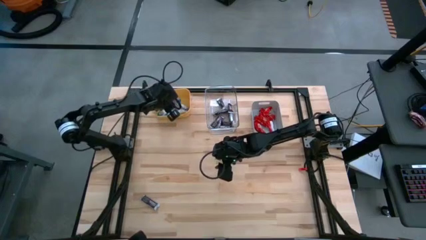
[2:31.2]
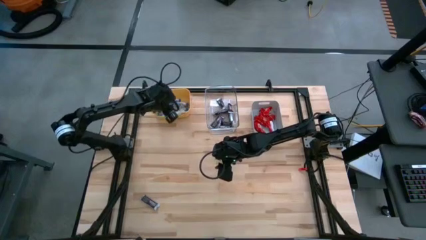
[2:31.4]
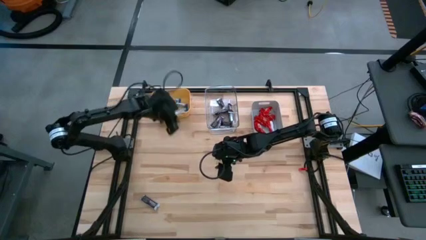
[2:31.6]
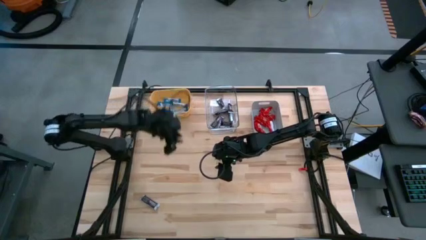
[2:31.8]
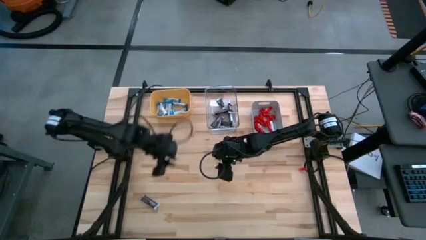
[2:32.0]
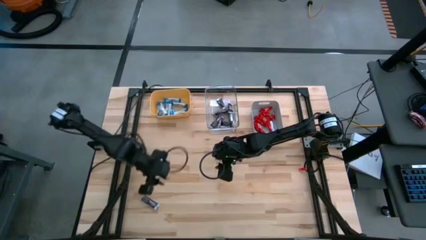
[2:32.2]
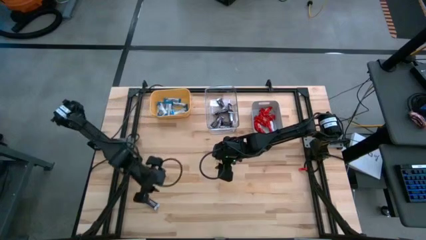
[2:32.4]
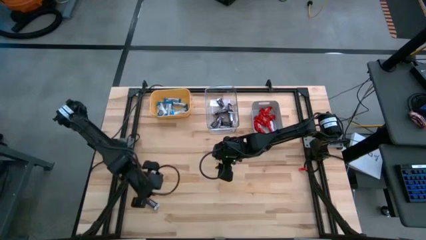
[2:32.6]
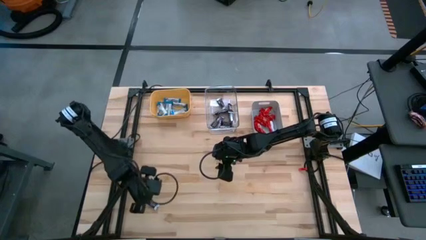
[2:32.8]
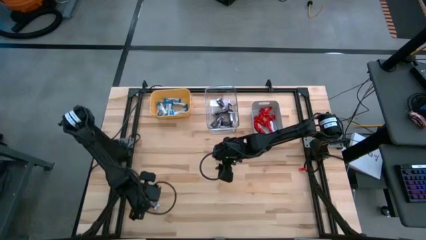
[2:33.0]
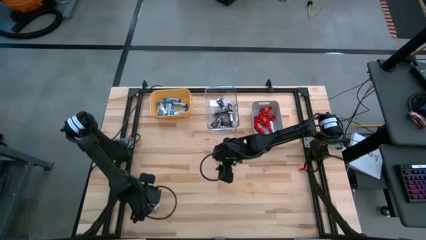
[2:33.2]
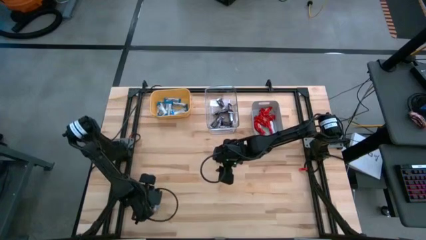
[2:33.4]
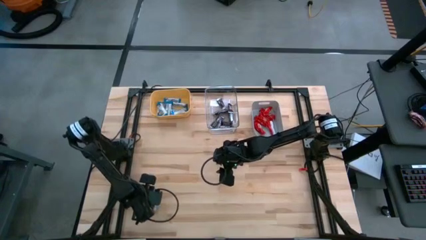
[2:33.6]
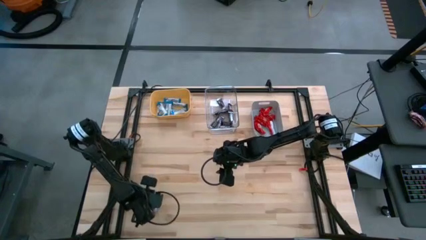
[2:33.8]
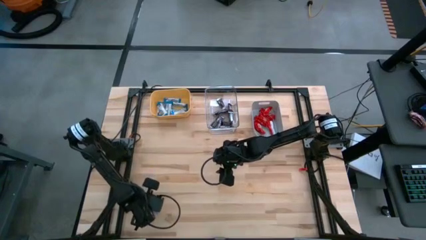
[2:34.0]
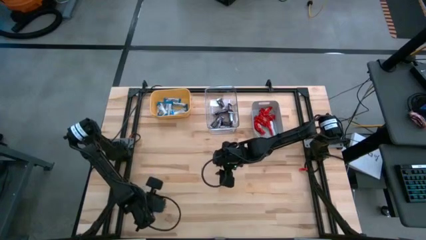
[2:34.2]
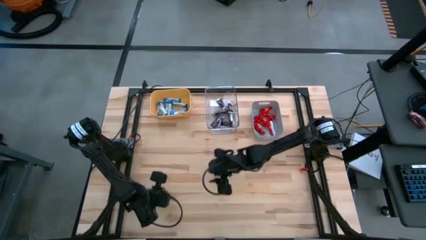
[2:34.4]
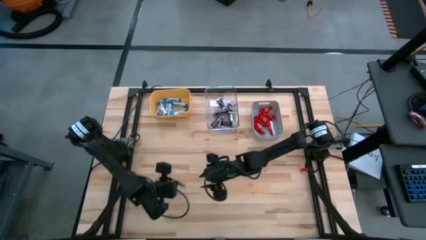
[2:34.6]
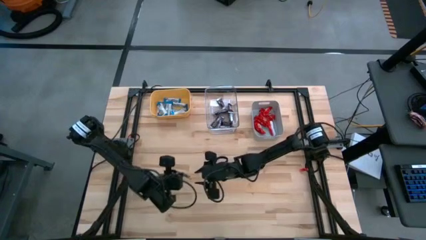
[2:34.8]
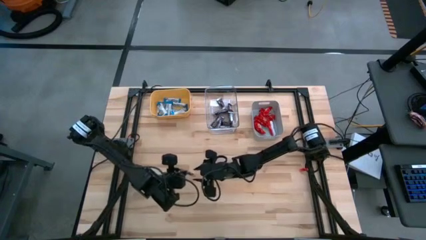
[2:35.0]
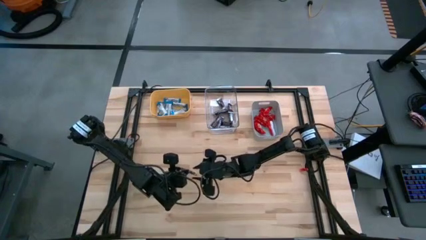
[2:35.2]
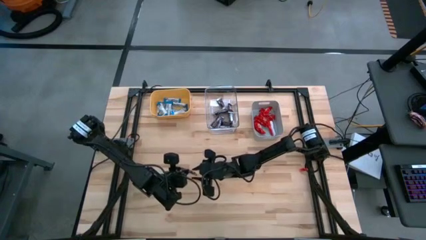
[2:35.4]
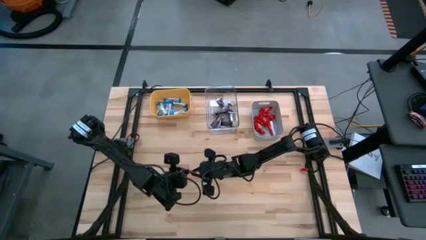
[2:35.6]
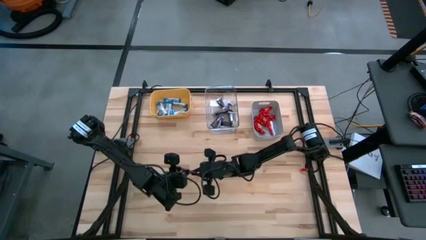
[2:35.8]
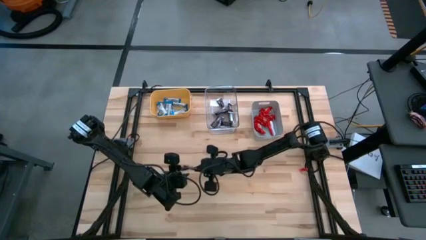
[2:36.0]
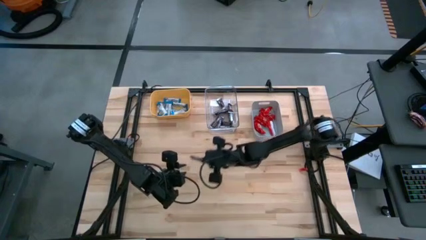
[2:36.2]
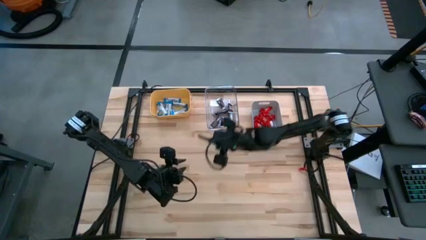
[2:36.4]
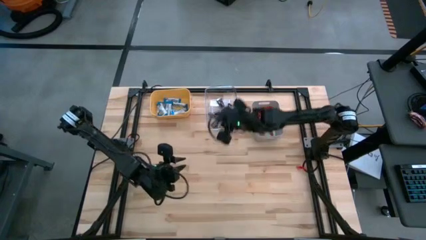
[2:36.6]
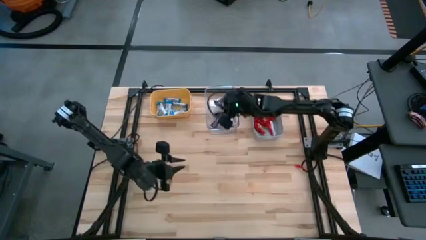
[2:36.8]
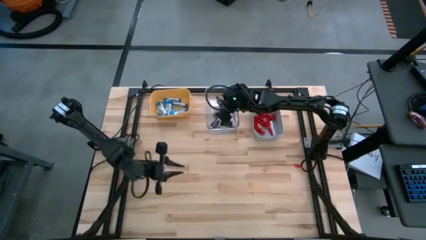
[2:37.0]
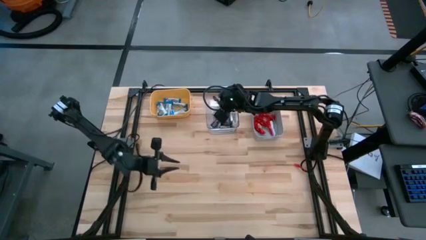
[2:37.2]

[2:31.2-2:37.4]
Task: Sort candy
Put the brown chocolate into the transparent bin

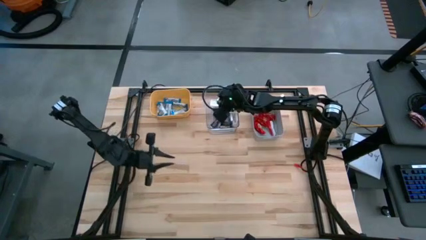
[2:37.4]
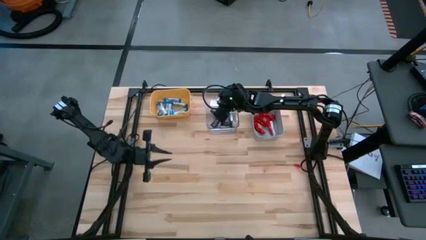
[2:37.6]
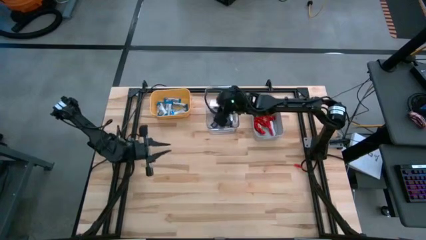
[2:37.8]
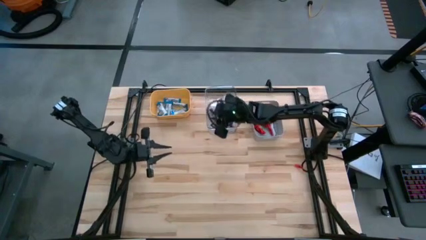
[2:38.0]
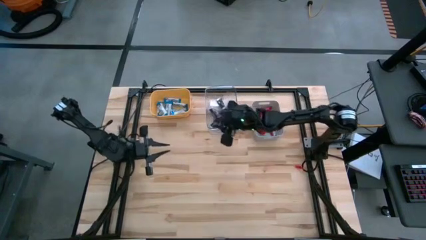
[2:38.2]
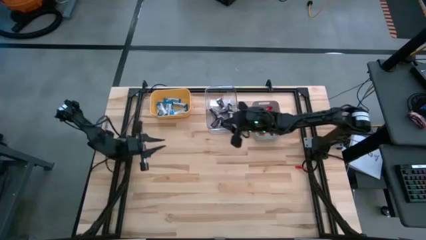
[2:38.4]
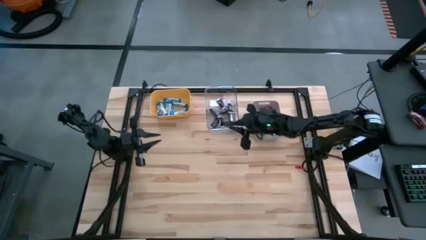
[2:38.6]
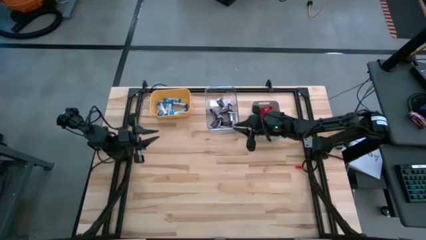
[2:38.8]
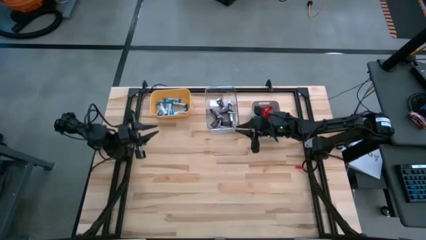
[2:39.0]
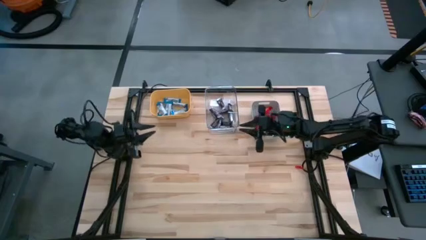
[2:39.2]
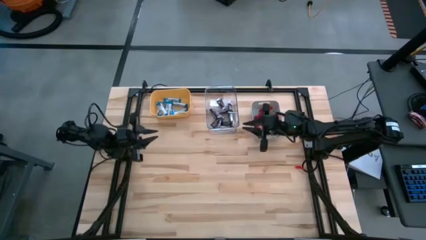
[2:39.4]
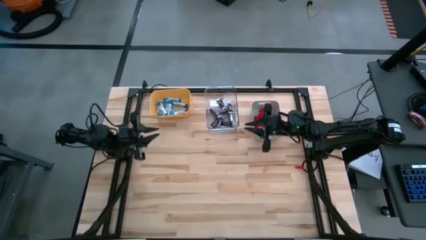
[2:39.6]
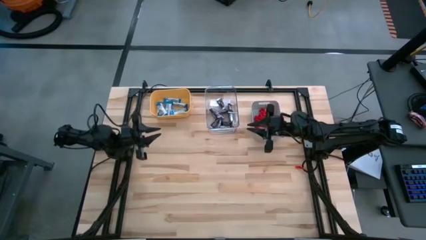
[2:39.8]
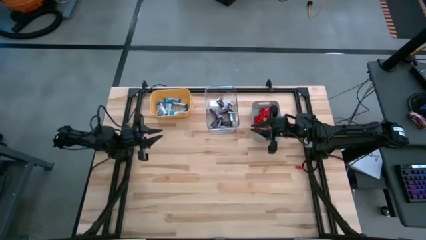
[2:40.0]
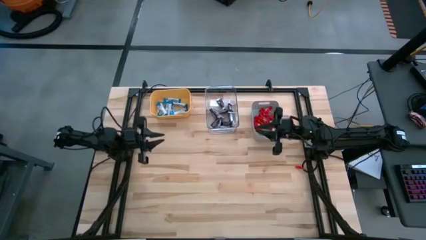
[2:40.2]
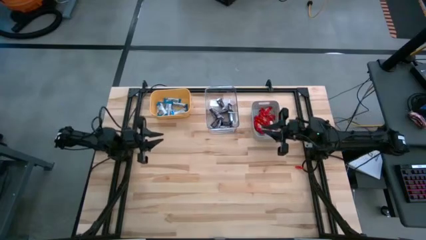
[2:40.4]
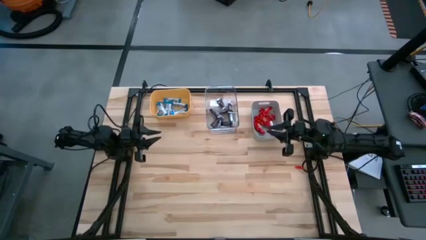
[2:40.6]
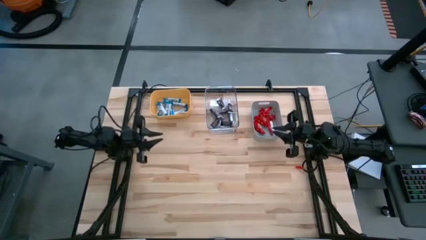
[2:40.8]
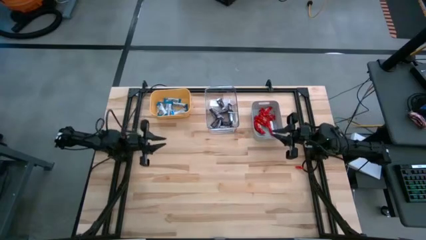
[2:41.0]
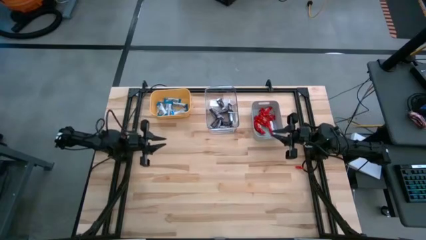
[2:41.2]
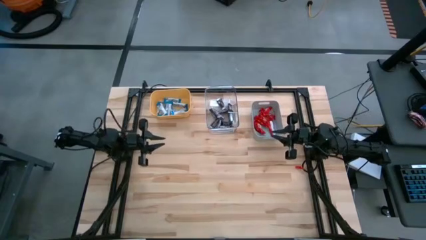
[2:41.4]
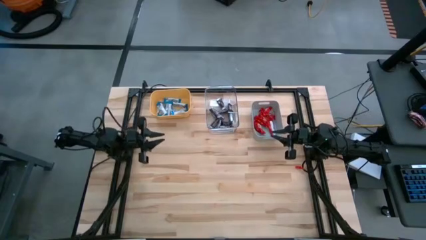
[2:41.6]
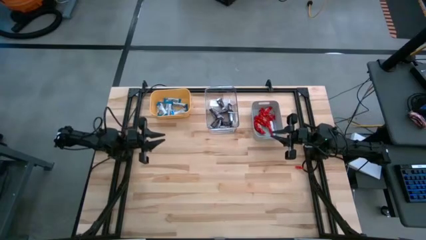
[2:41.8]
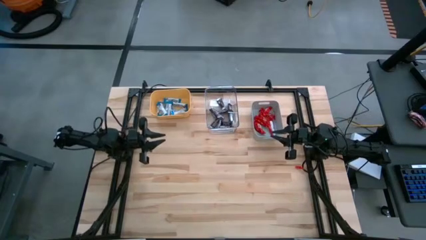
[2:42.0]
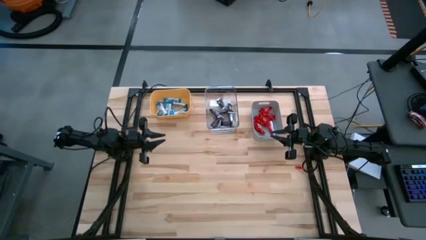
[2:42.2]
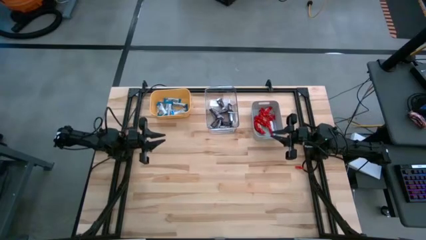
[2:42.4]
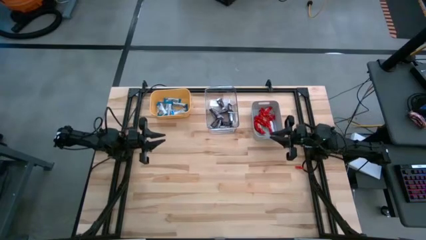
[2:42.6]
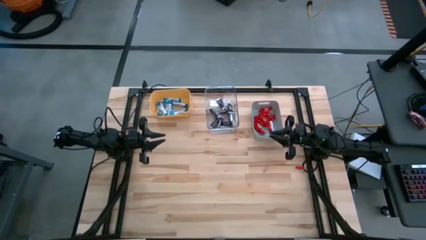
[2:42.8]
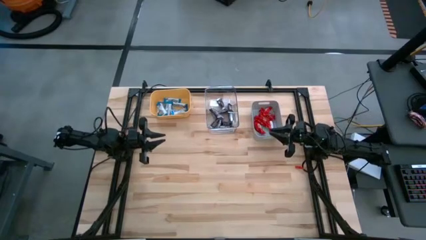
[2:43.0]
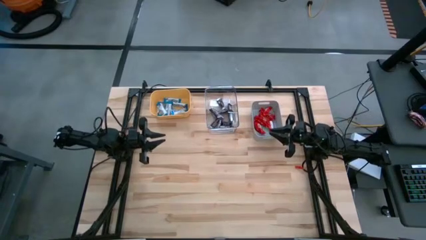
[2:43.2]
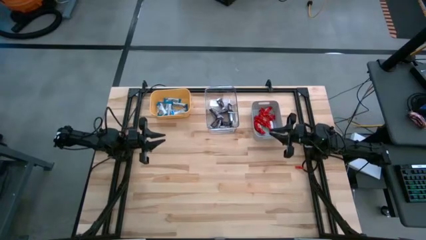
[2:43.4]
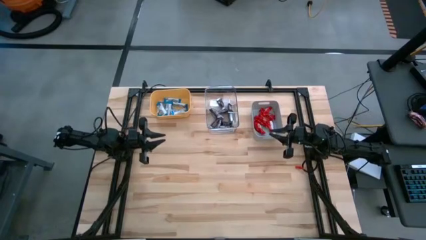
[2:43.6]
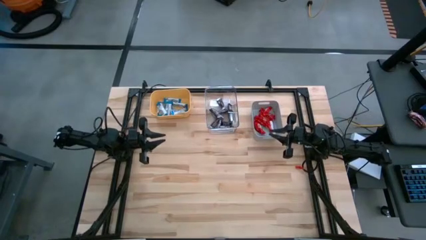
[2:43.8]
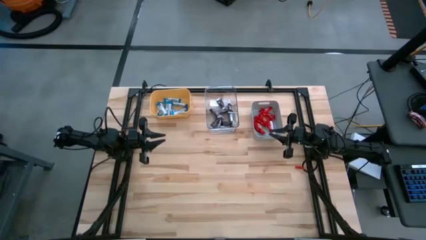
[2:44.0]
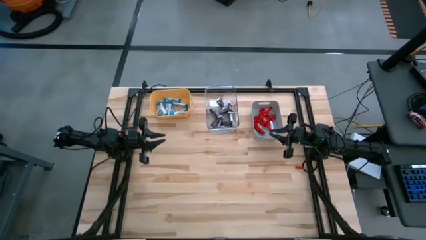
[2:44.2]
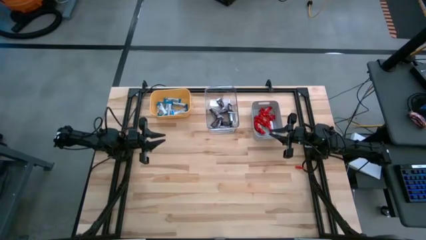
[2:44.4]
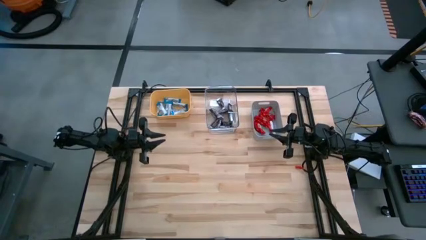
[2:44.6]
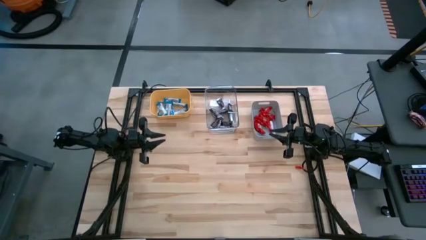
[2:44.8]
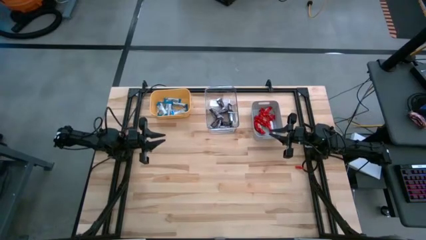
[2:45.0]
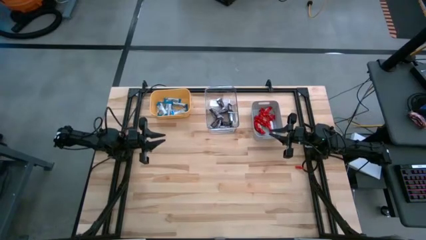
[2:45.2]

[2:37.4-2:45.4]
Return to Home Position
